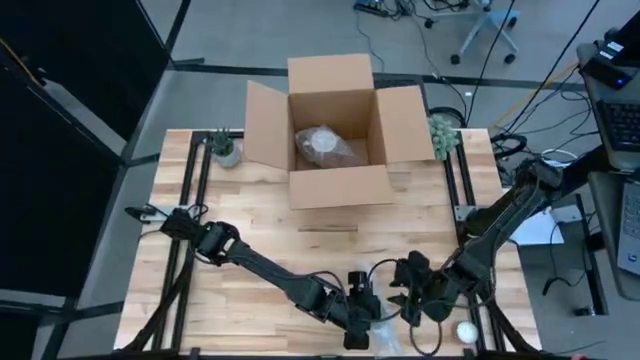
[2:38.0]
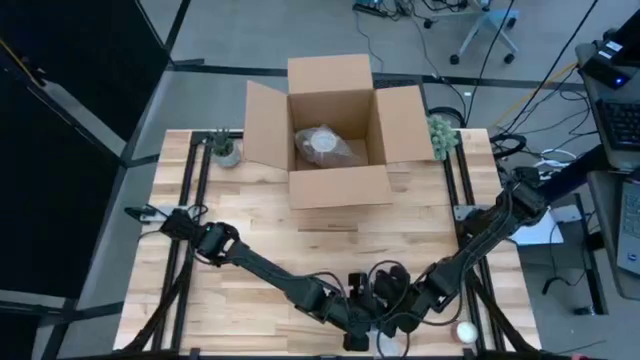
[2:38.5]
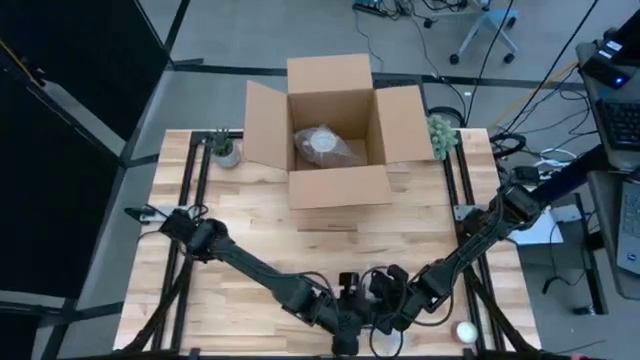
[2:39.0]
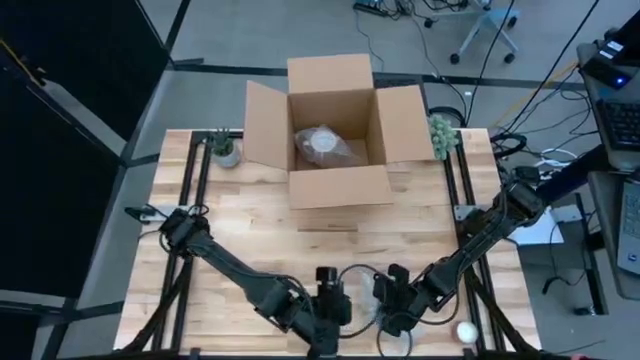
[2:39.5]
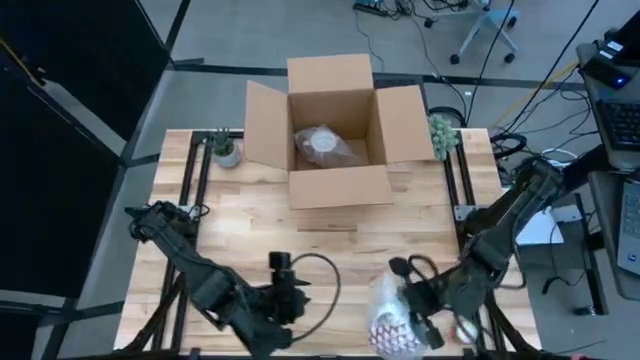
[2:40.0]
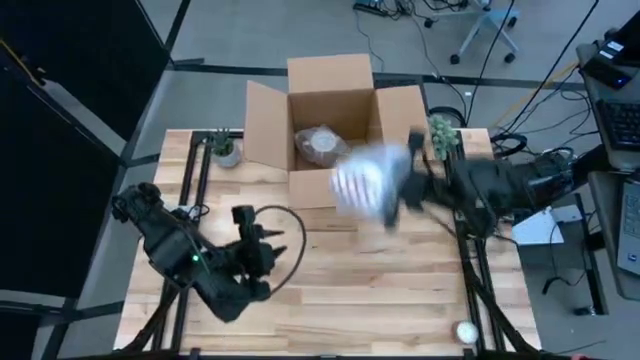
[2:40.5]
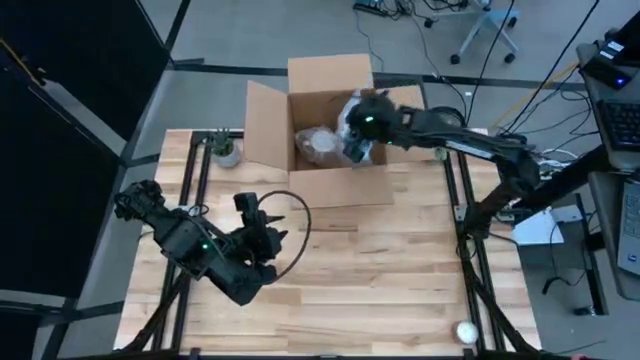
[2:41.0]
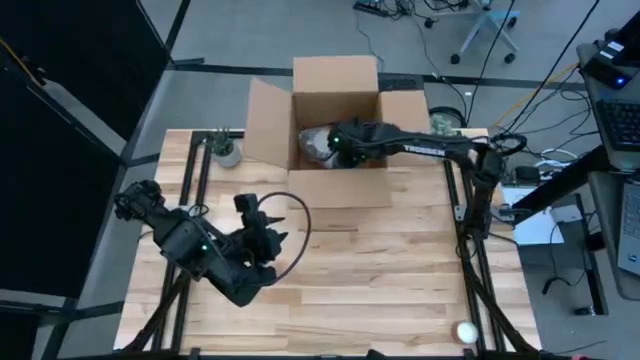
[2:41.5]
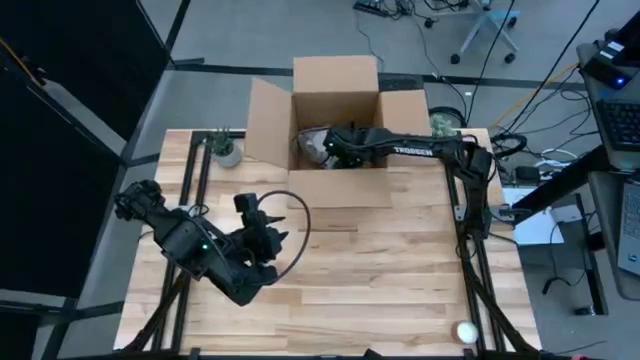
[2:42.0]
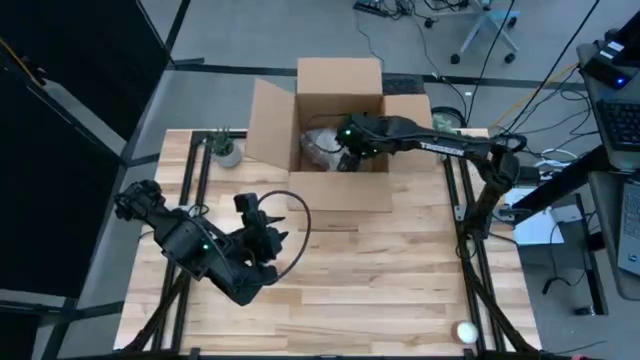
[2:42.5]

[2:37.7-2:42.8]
Task: wrap mug
Put the wrapped red mug into the box

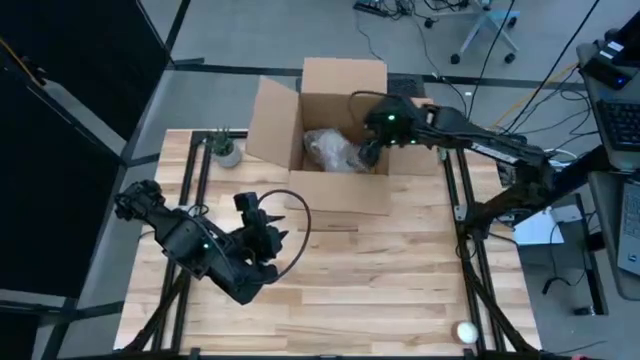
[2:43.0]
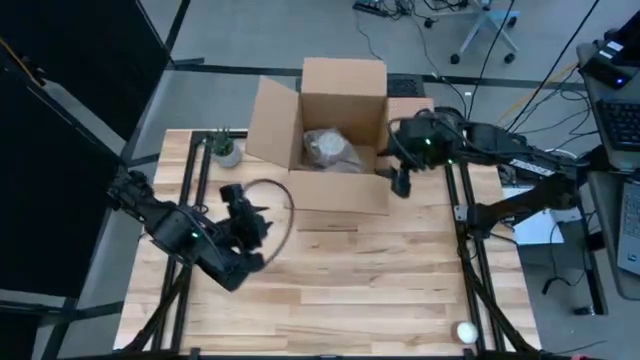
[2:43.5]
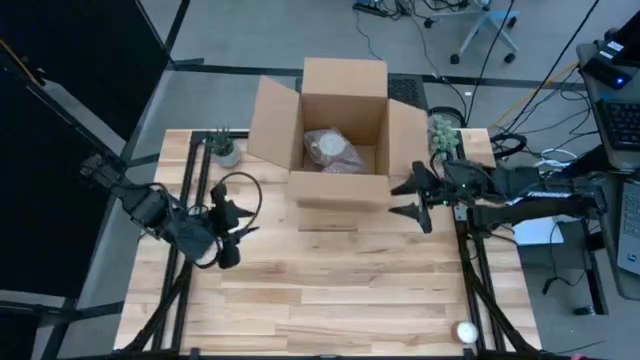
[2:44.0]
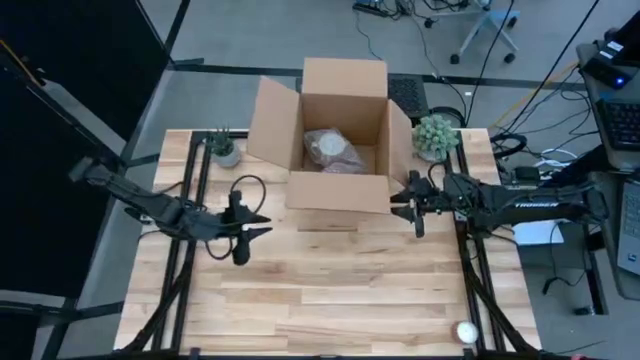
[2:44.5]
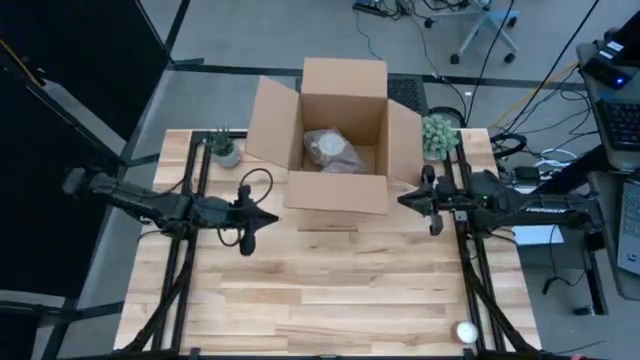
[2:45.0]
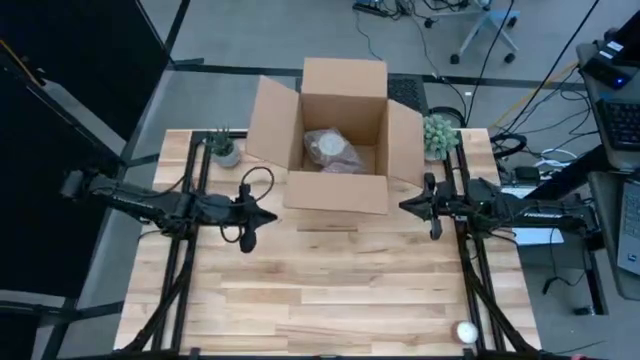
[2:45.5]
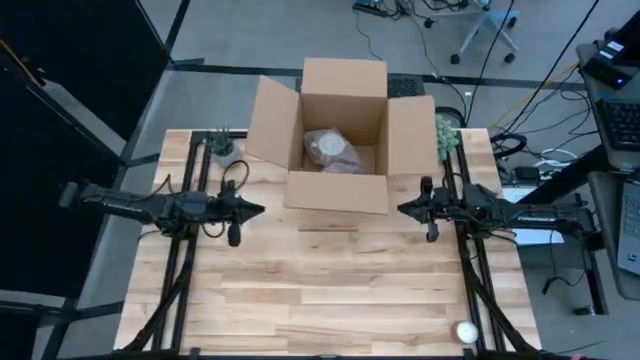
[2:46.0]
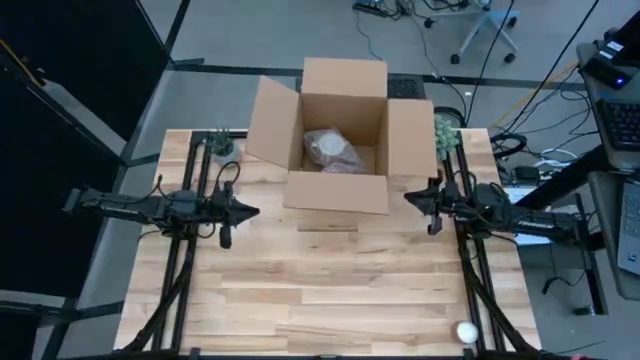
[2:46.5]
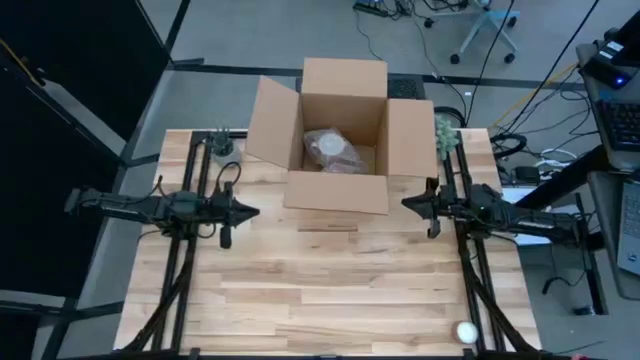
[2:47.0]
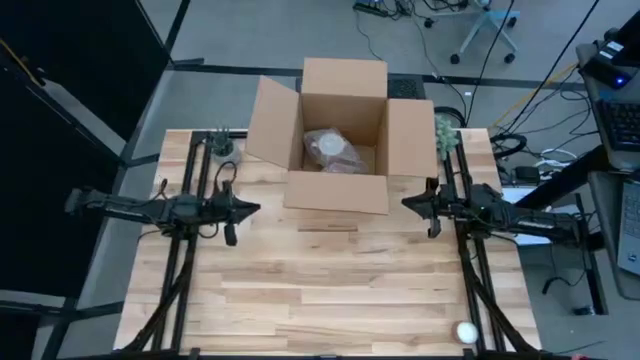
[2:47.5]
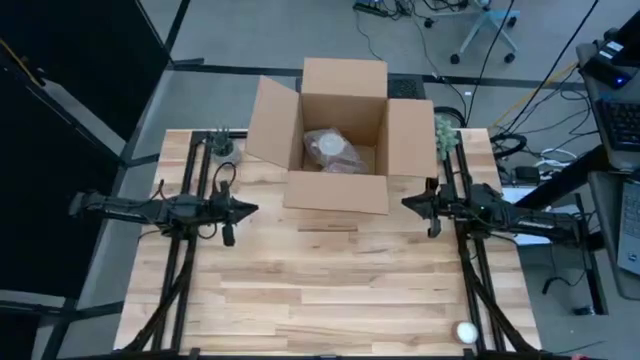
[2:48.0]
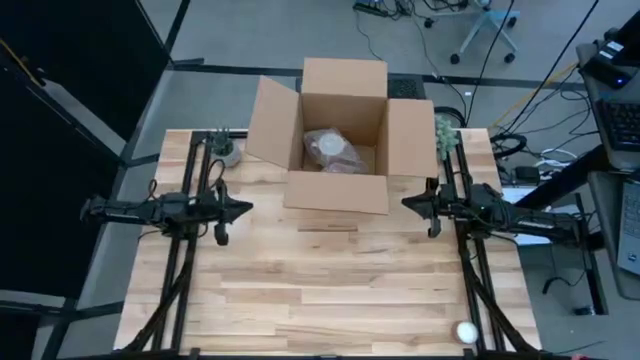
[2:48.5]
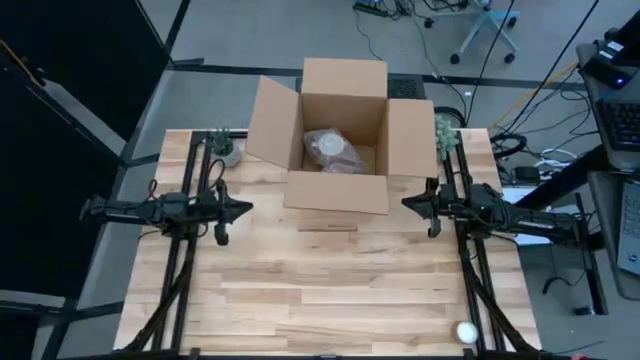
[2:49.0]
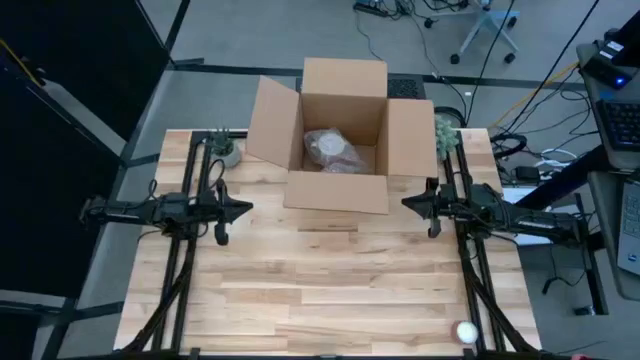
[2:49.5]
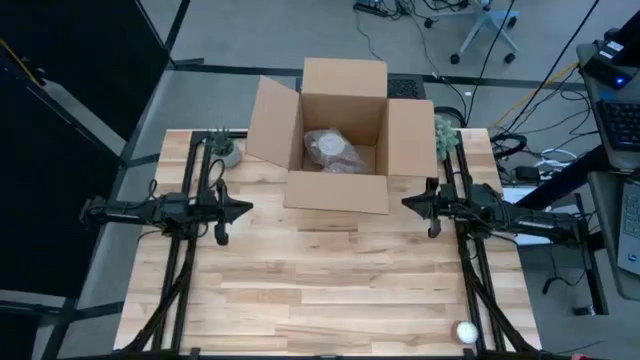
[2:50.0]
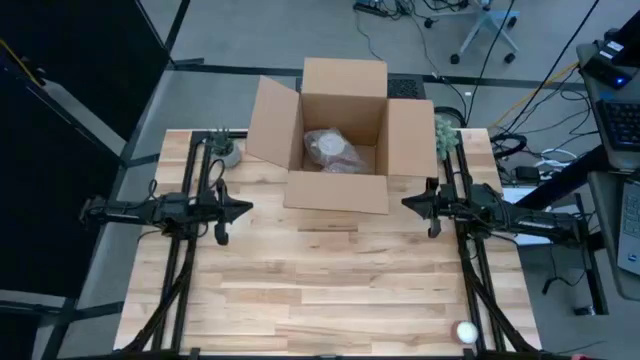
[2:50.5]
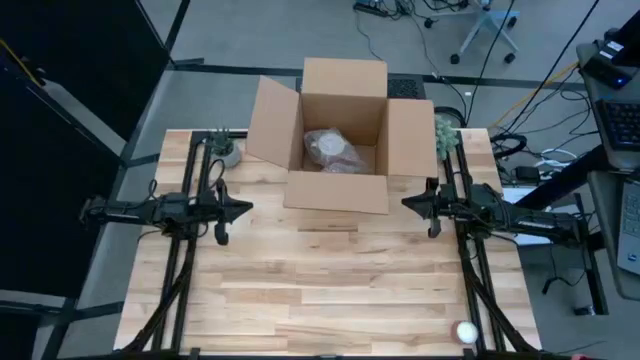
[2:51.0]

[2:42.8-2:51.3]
Return to Home Position

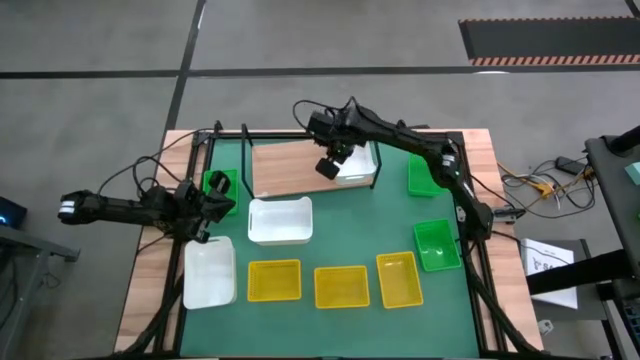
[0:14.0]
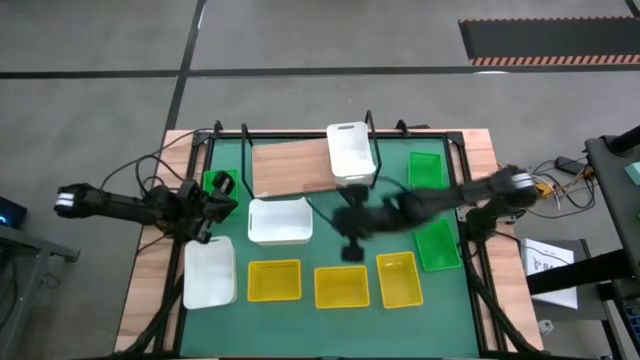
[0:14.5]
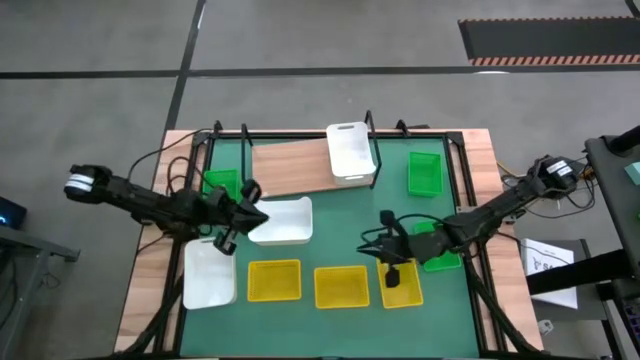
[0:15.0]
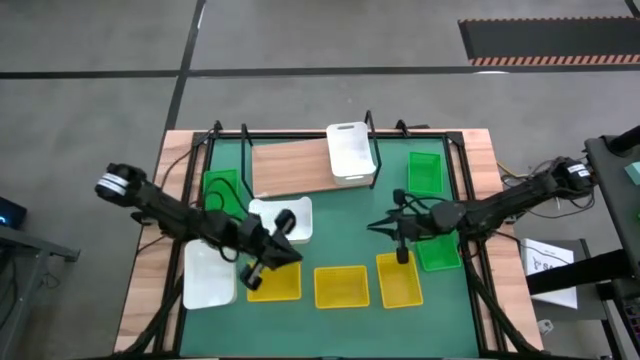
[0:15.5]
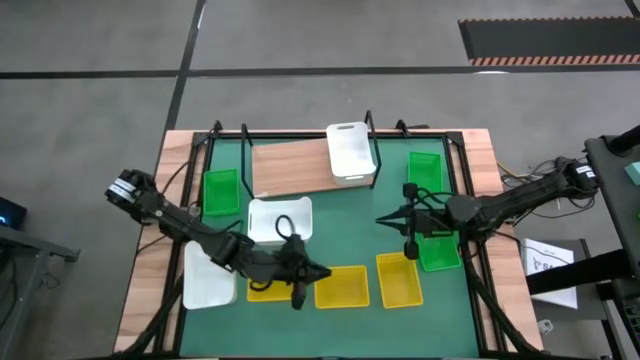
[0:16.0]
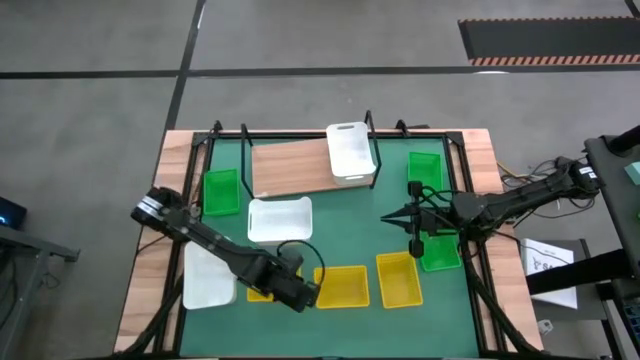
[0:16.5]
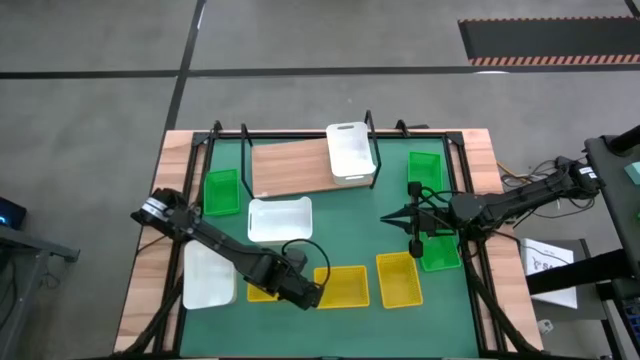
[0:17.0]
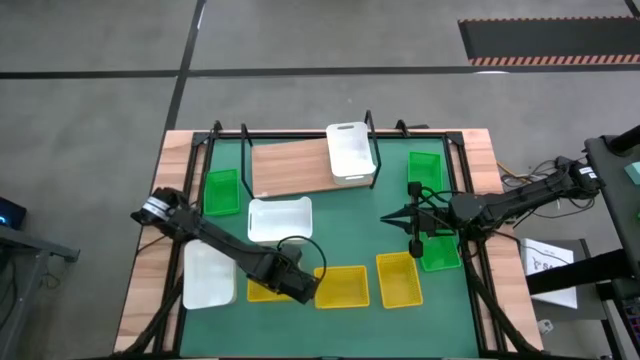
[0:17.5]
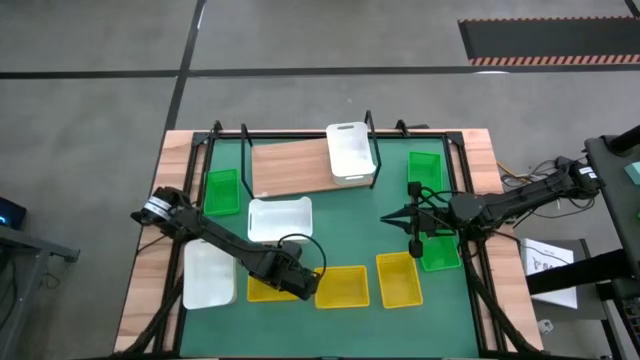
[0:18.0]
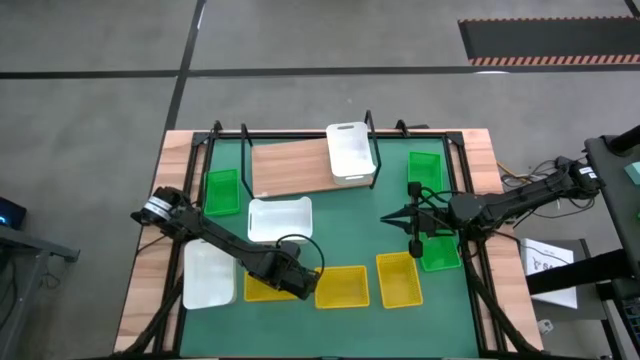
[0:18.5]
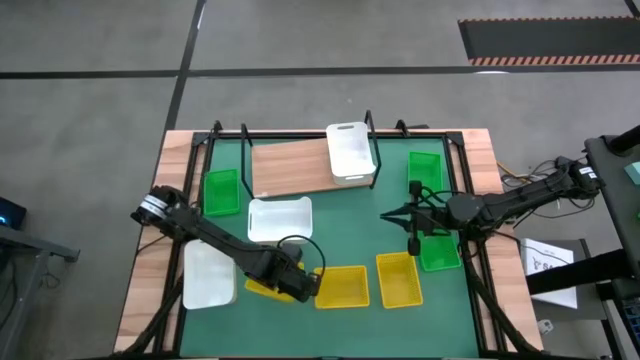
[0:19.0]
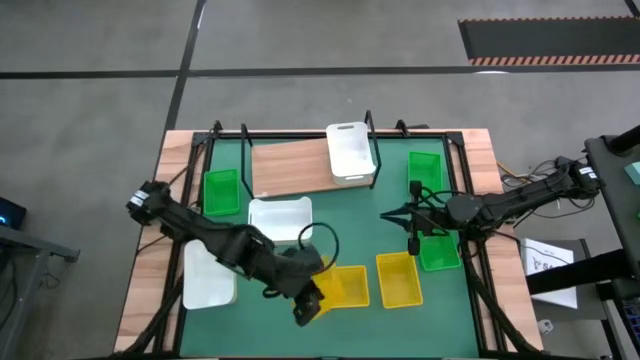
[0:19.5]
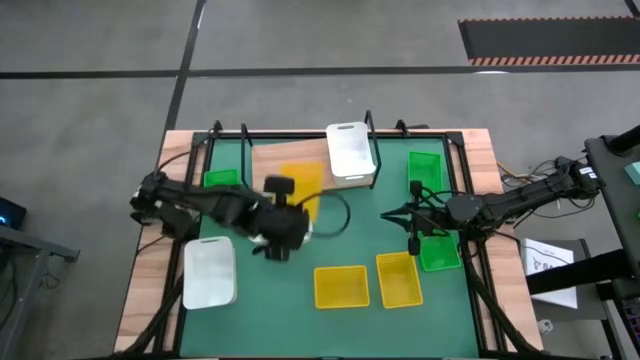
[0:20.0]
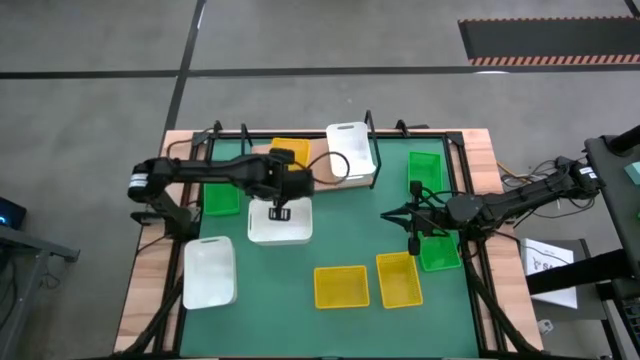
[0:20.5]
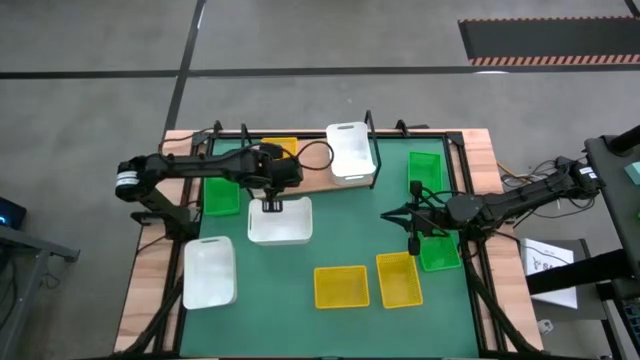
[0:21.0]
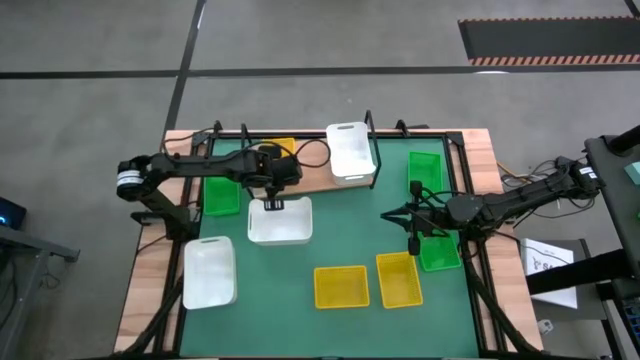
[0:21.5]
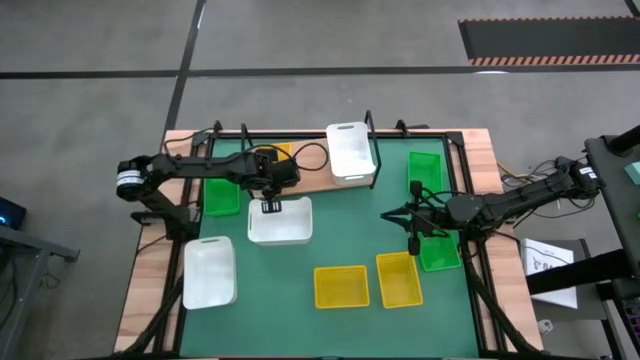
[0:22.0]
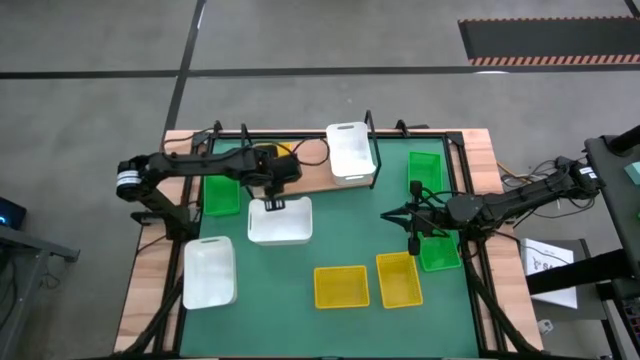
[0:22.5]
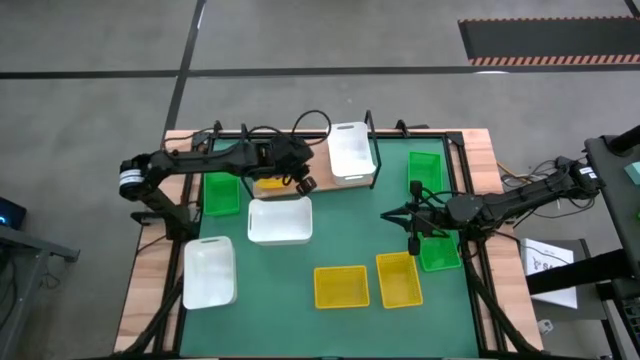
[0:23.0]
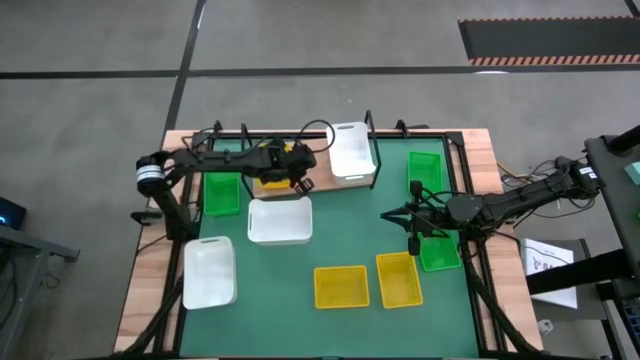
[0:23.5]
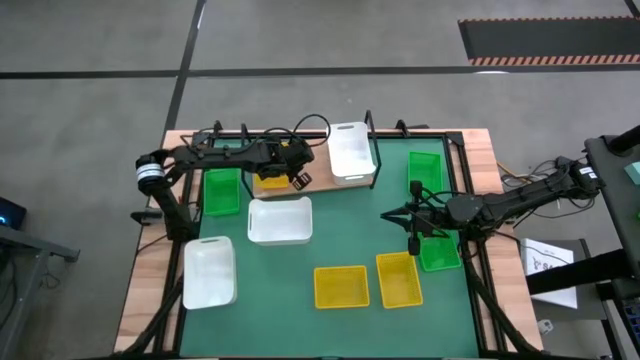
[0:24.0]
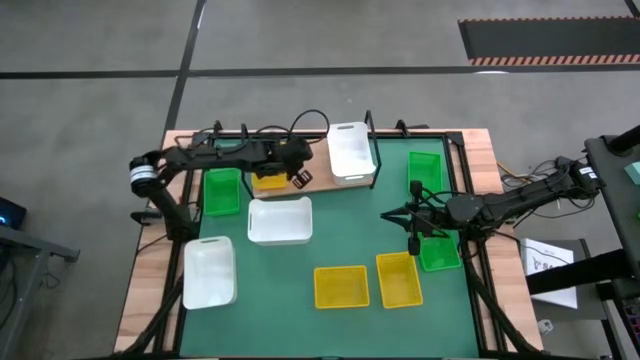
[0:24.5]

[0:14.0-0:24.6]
Task: Stack baskets on shelf by color
Put the left yellow bin on the shelf
